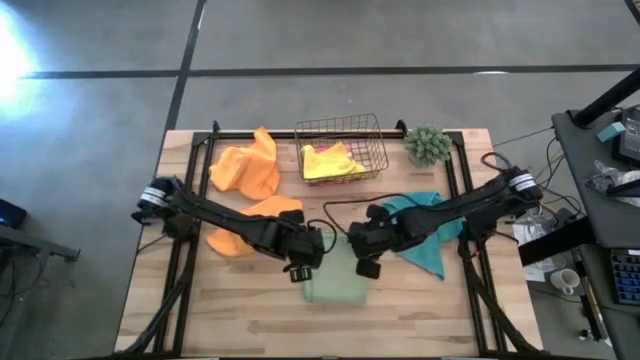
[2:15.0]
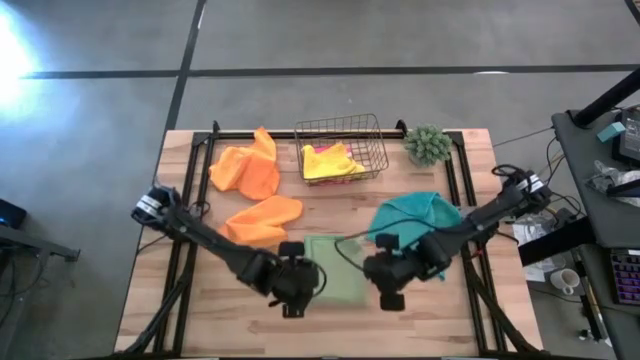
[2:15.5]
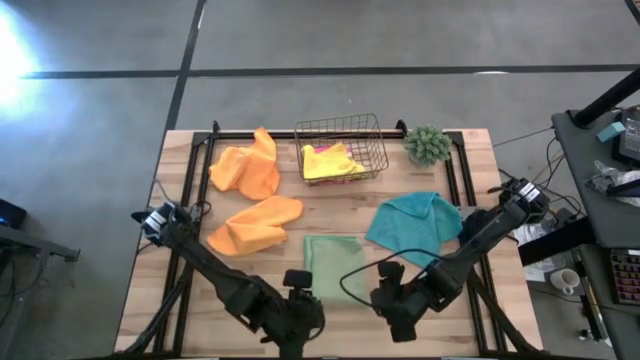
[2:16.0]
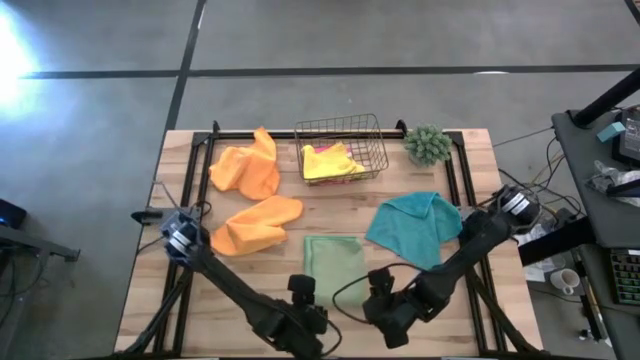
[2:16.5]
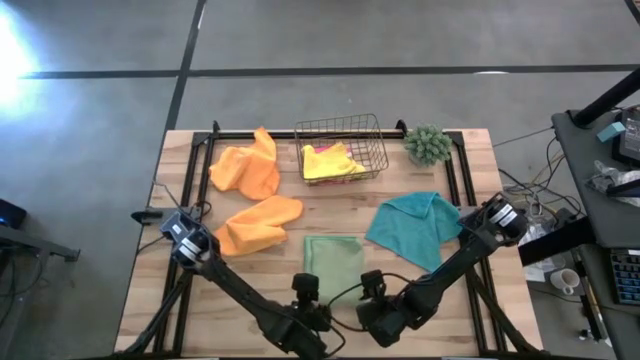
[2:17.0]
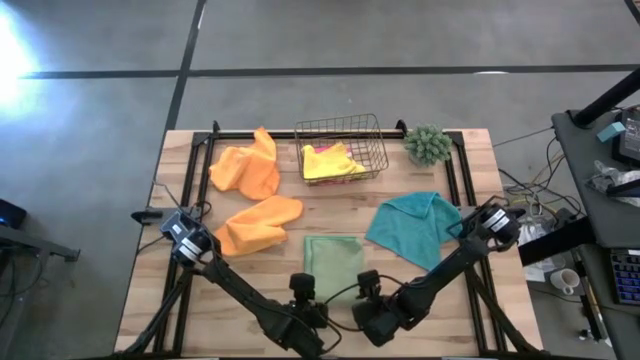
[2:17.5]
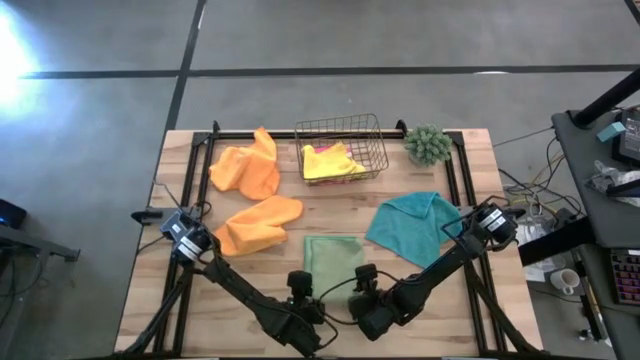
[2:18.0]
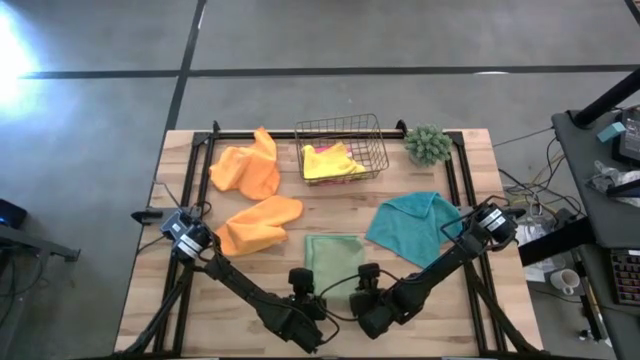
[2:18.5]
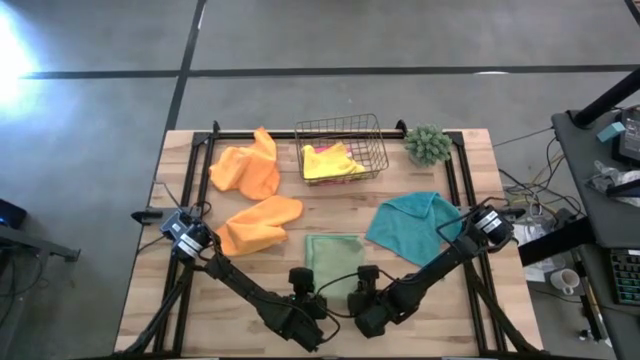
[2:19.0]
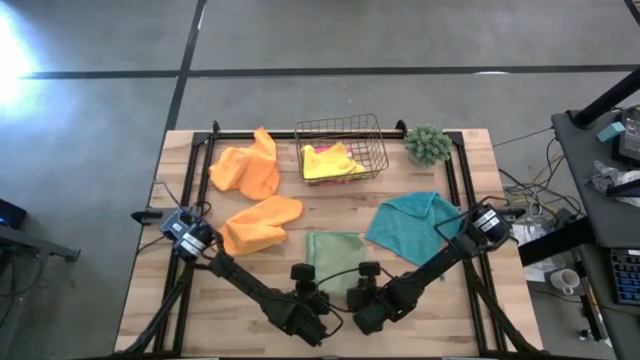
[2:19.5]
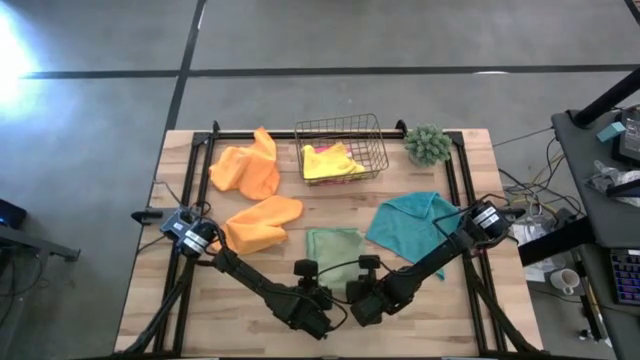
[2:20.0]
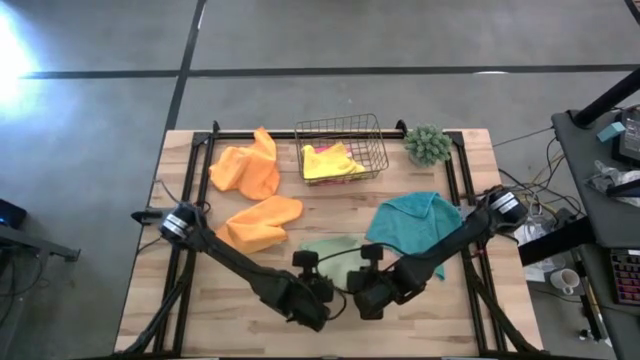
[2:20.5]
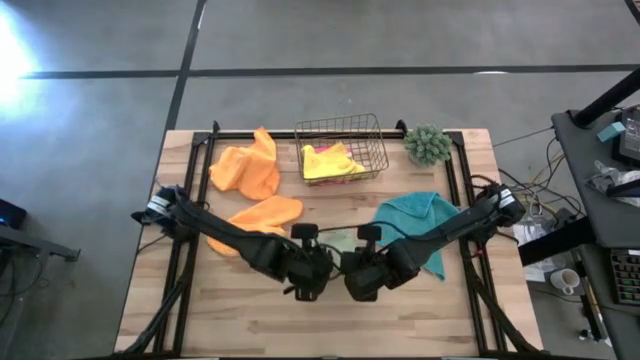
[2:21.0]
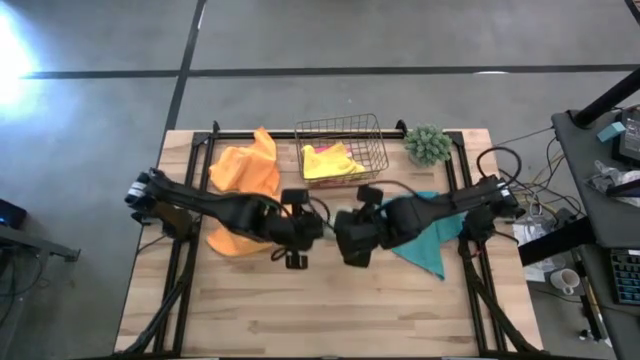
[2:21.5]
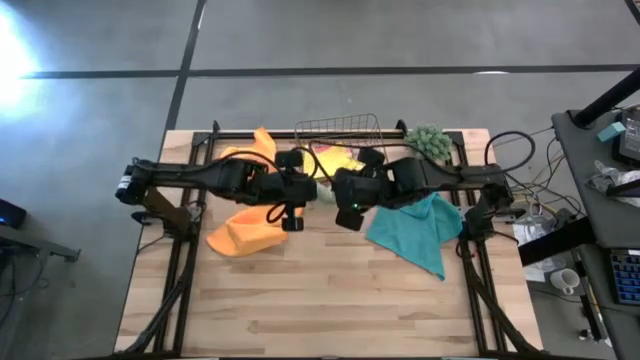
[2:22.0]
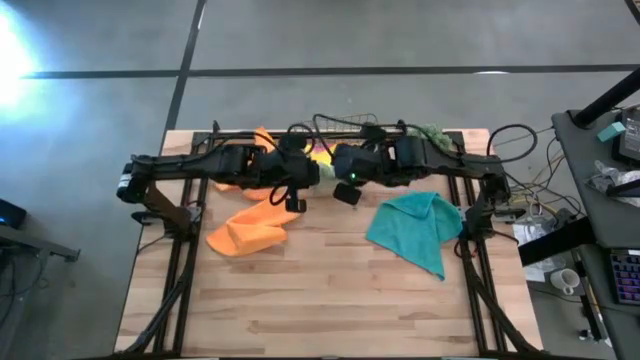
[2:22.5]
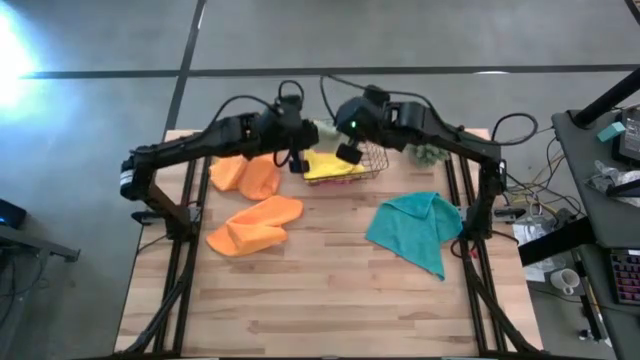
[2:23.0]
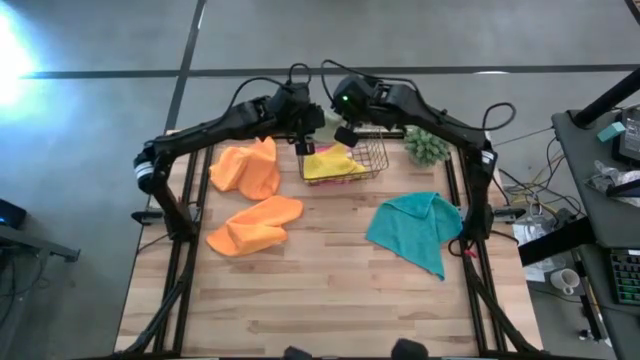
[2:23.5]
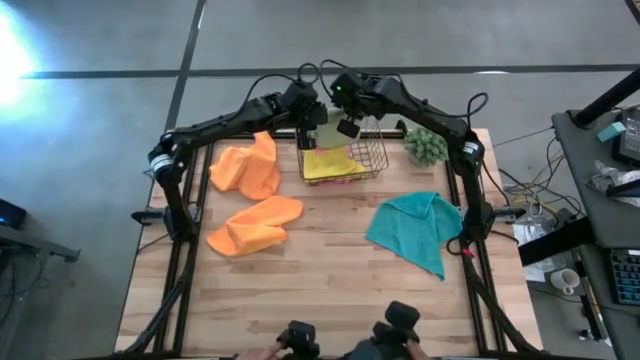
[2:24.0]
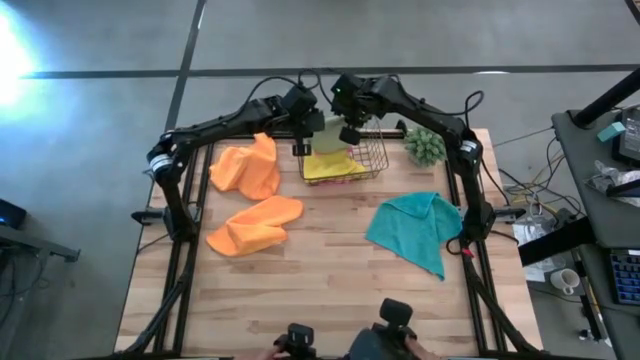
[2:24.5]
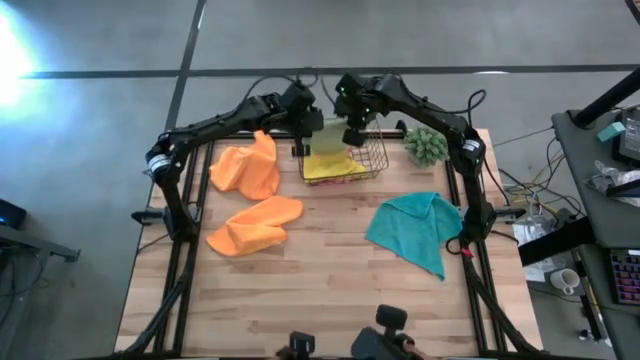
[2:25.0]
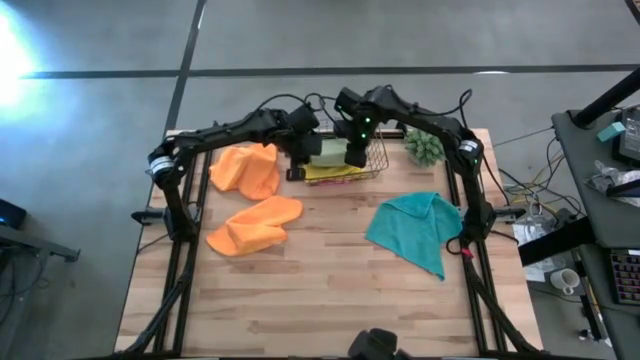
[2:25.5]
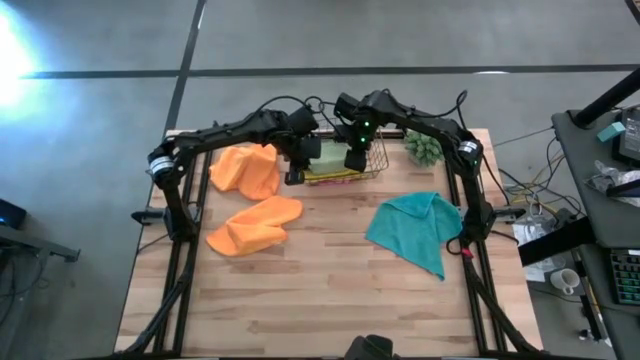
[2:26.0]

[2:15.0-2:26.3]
Task: Fold microfiber towels
Put the folded green microfiber cloth into the gold wire basket

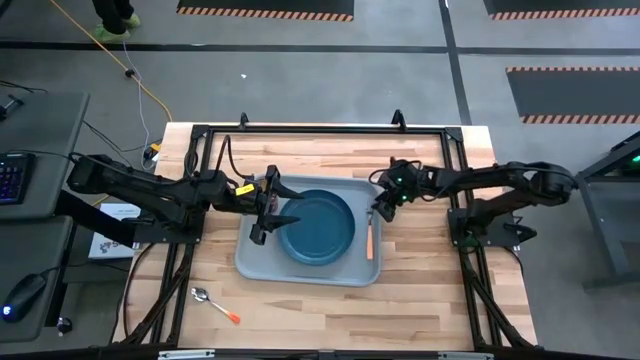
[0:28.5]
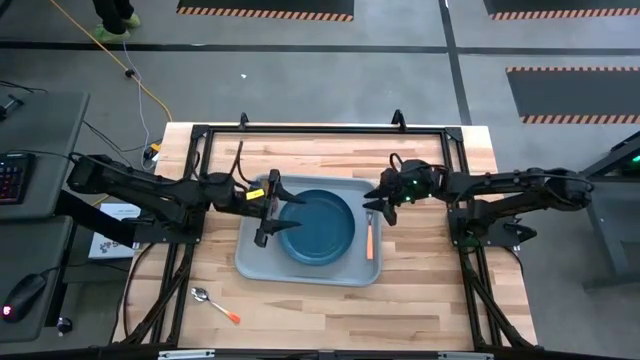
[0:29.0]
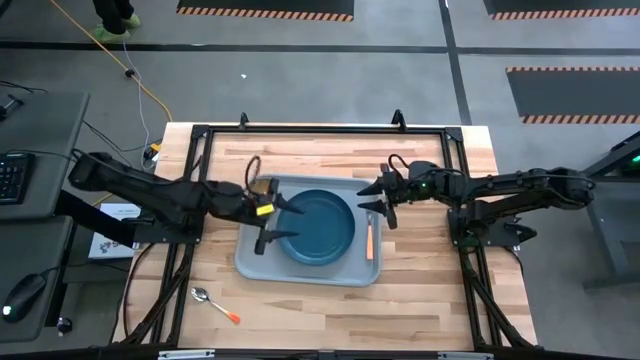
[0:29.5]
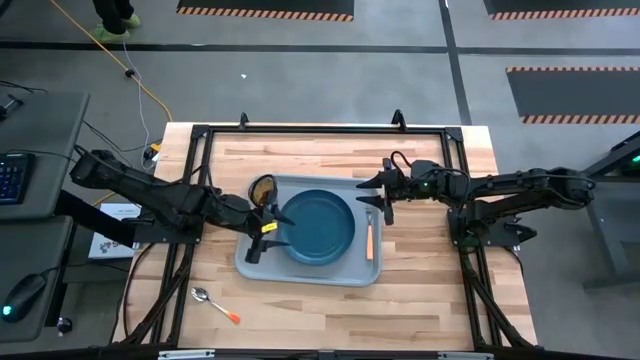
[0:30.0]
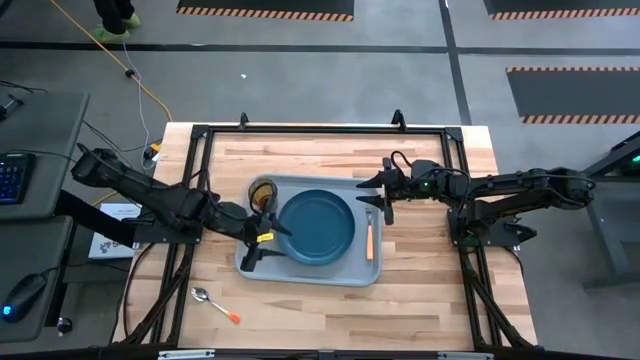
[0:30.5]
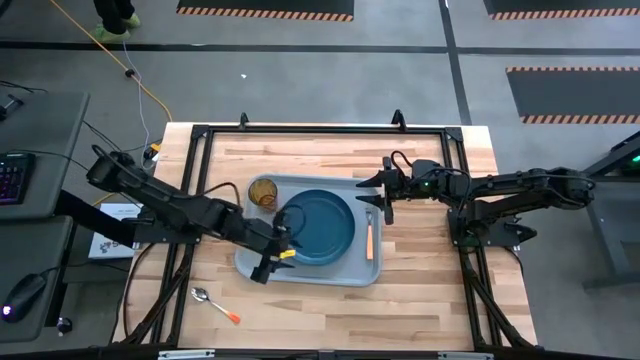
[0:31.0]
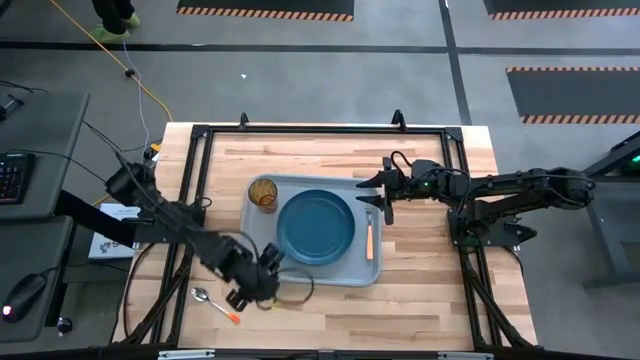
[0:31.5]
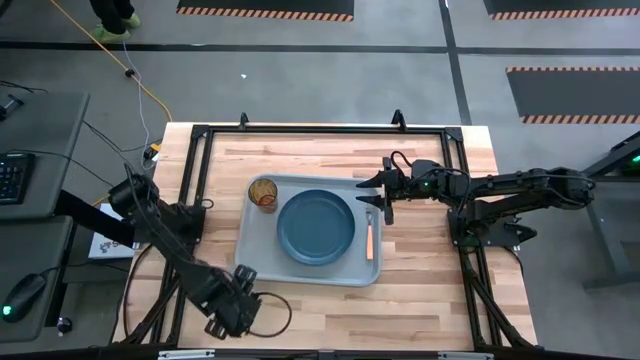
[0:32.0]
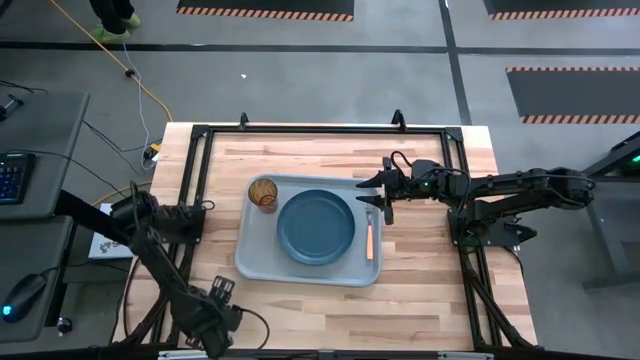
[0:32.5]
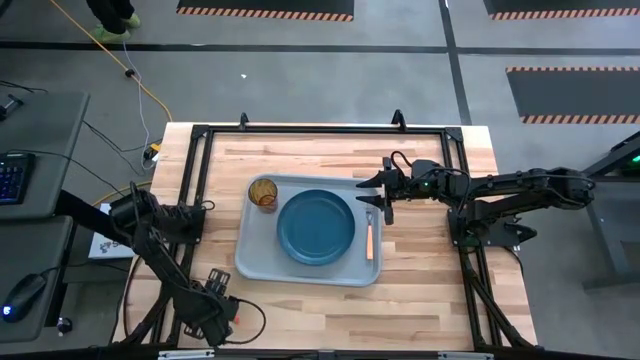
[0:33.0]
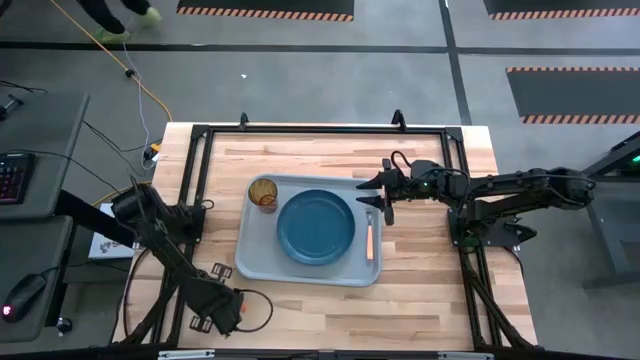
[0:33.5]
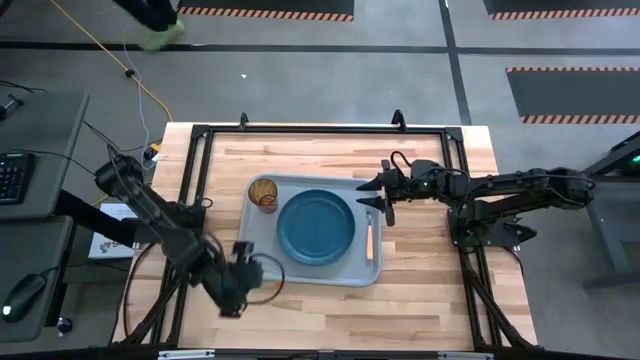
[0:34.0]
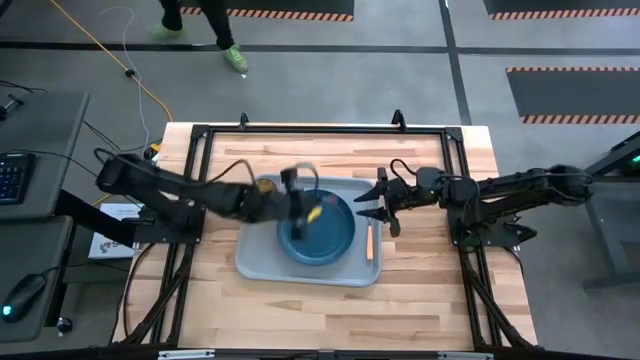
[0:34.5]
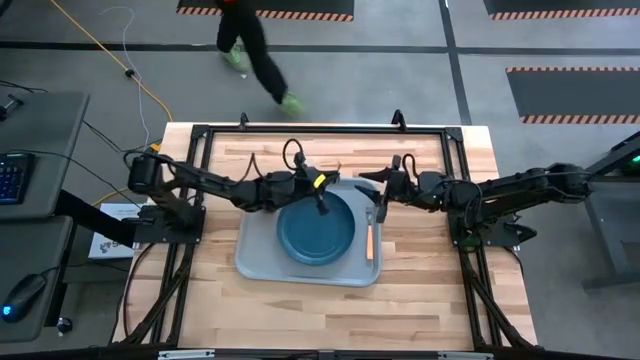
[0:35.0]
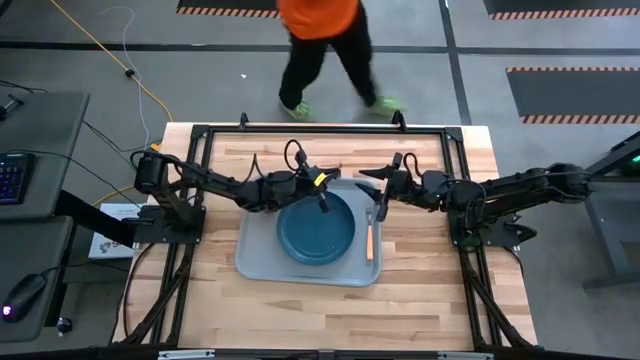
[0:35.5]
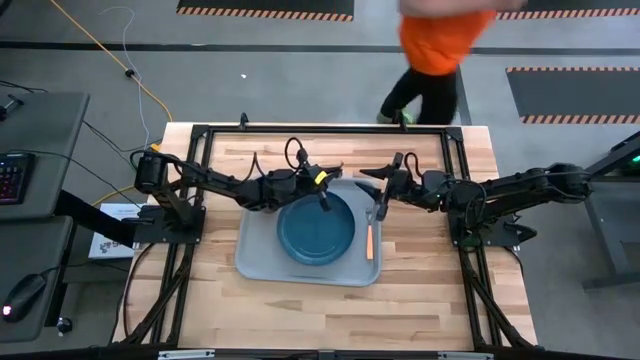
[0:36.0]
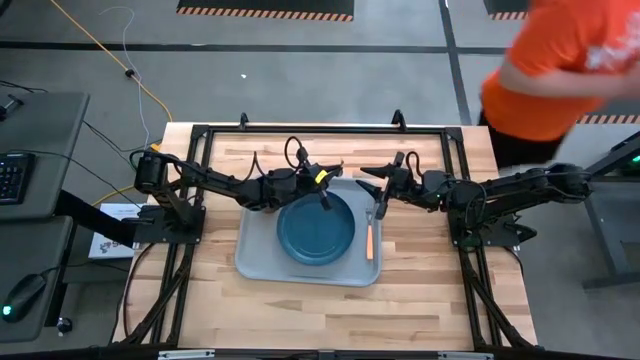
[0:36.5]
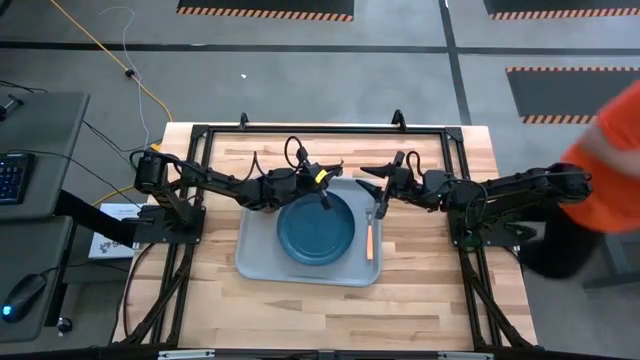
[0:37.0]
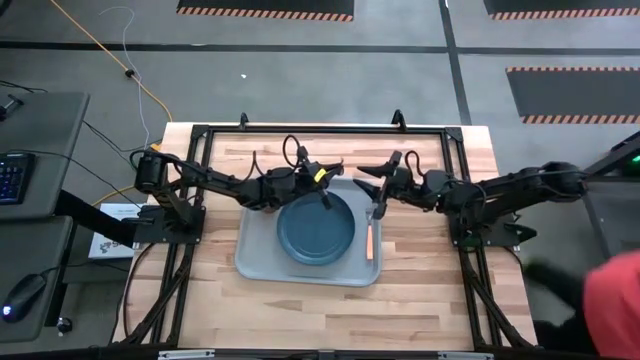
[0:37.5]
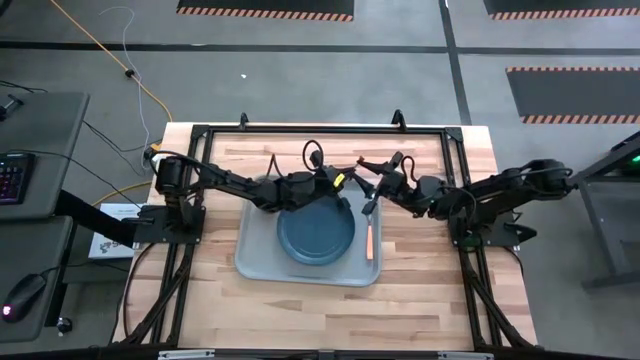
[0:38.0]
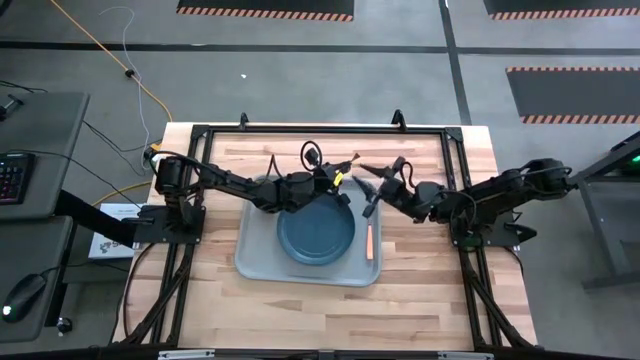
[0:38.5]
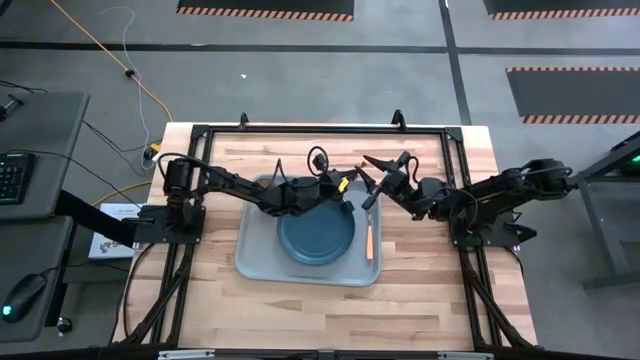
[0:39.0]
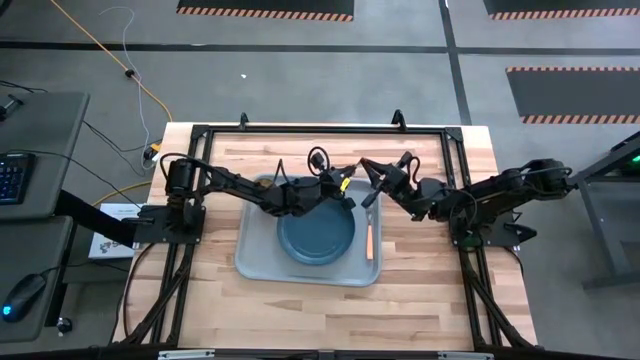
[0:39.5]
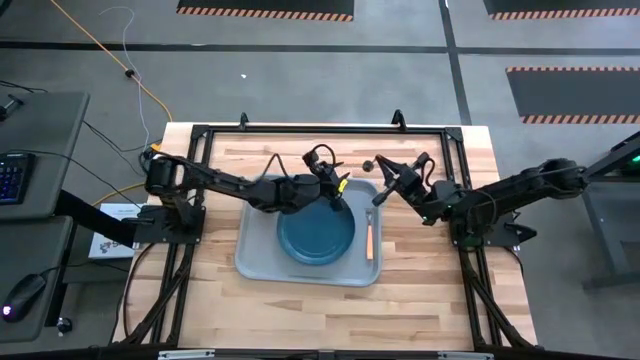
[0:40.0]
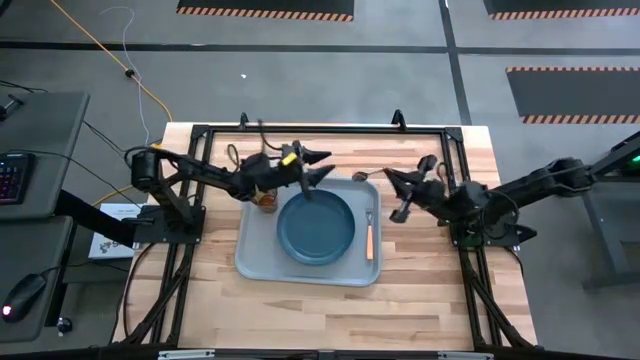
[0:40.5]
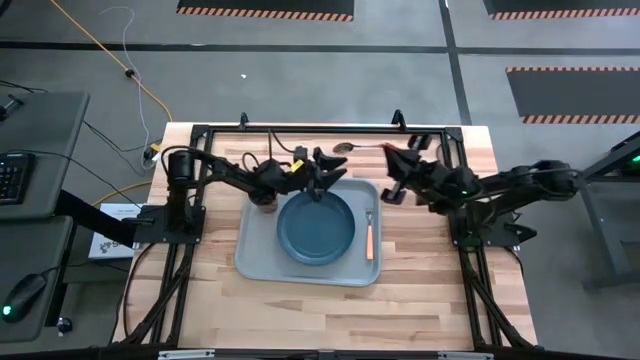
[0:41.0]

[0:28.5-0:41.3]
Task: Pick and place plate/cup/fork/spoon on tray
Put the orange spoon on the blue tray to the left of the orange fork
